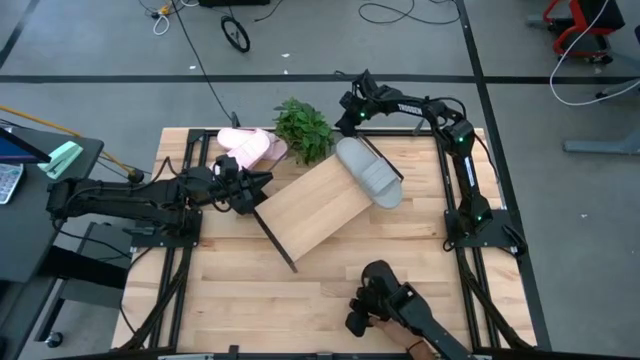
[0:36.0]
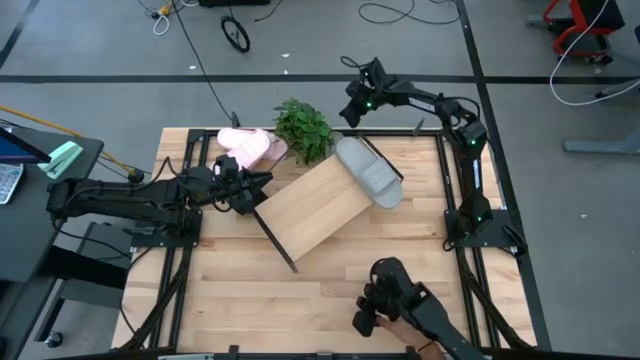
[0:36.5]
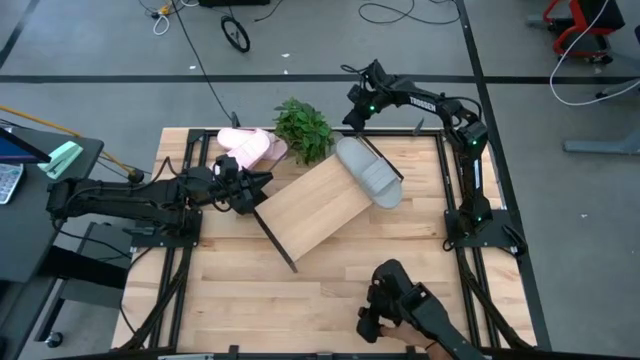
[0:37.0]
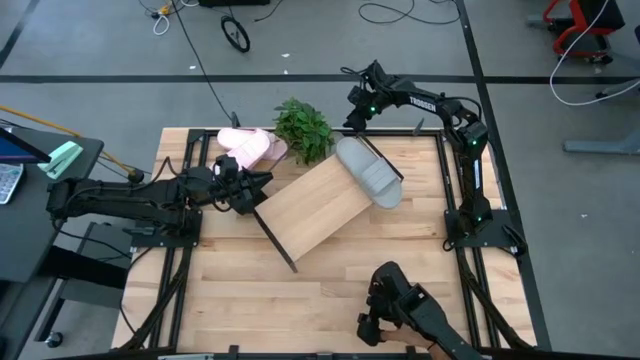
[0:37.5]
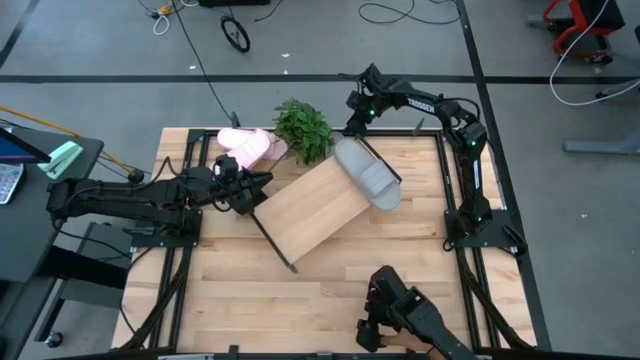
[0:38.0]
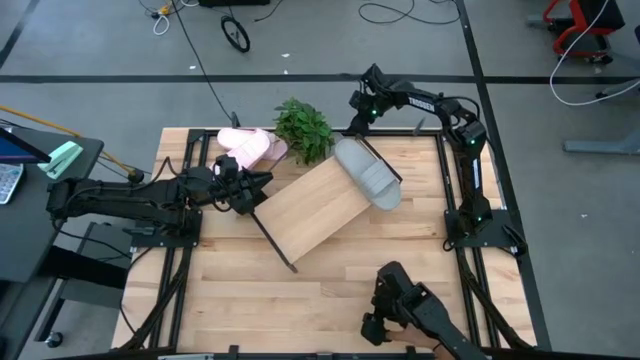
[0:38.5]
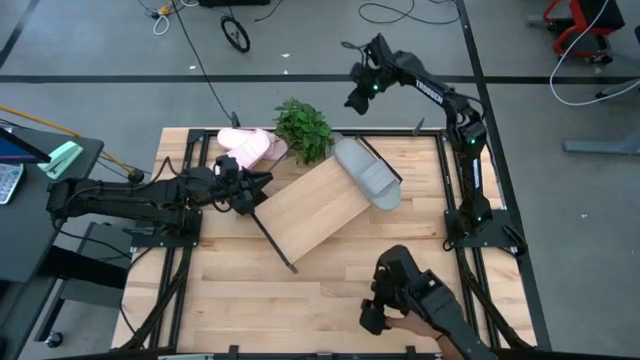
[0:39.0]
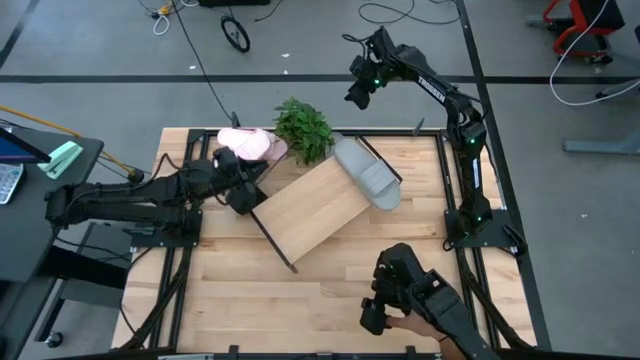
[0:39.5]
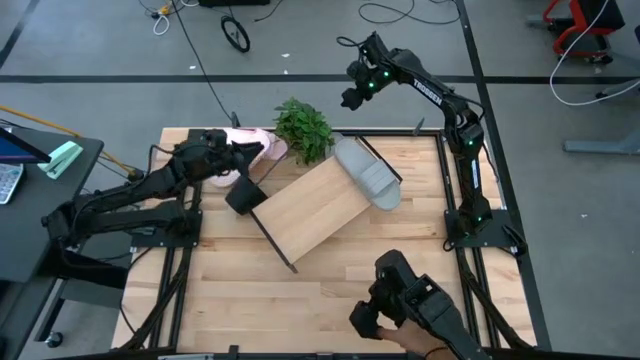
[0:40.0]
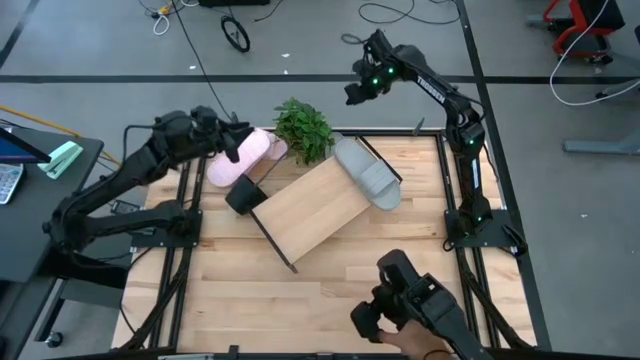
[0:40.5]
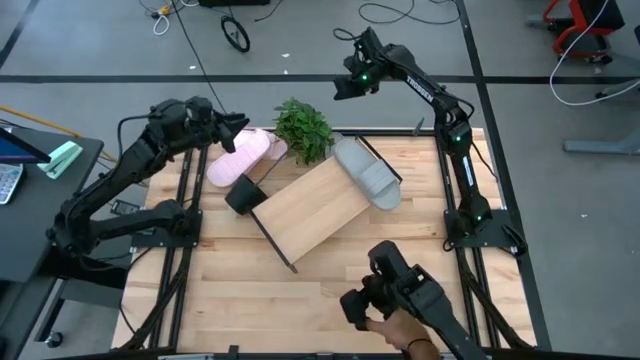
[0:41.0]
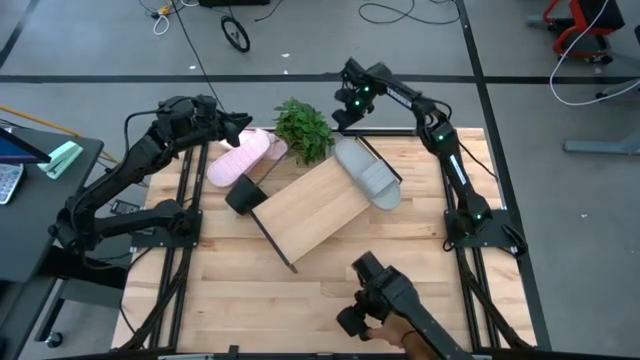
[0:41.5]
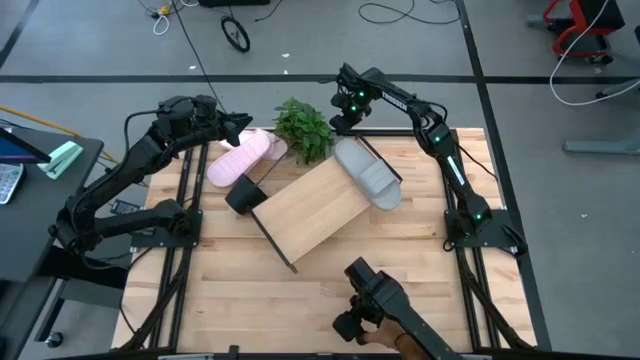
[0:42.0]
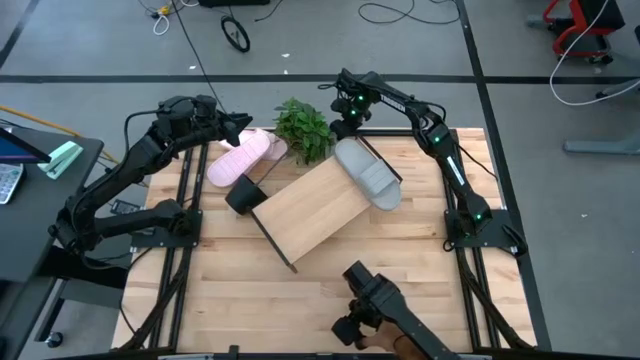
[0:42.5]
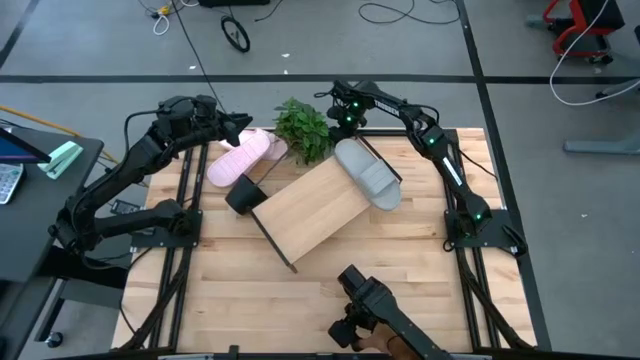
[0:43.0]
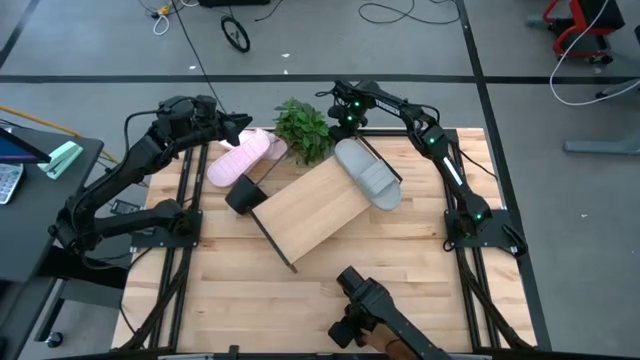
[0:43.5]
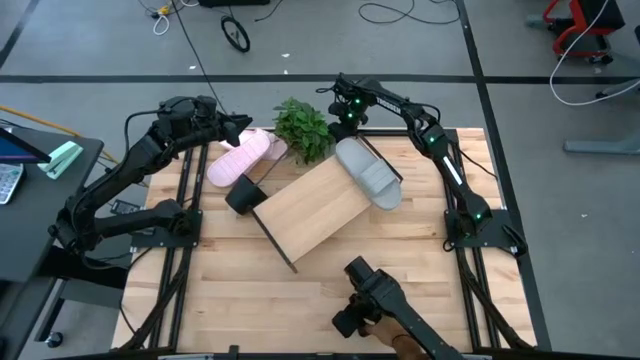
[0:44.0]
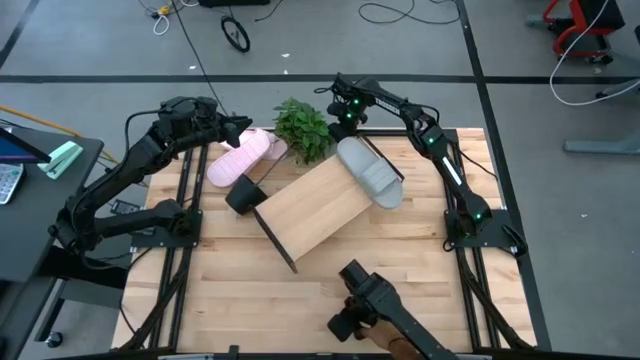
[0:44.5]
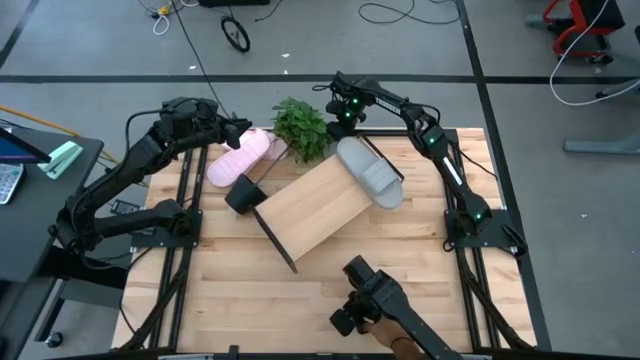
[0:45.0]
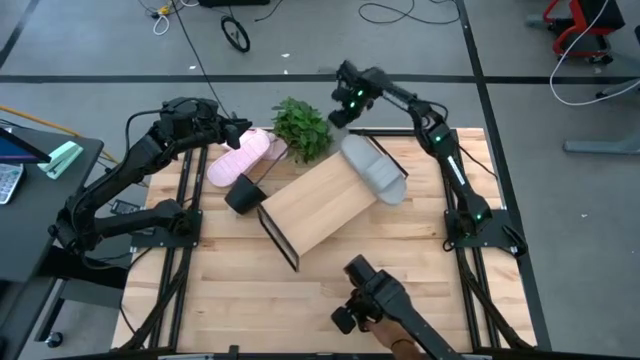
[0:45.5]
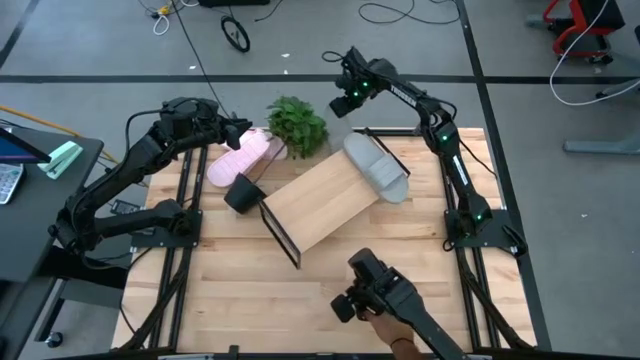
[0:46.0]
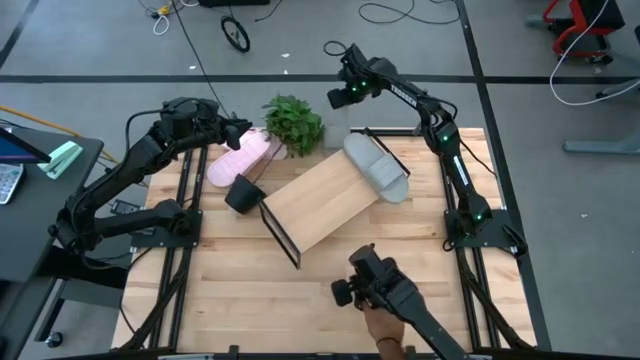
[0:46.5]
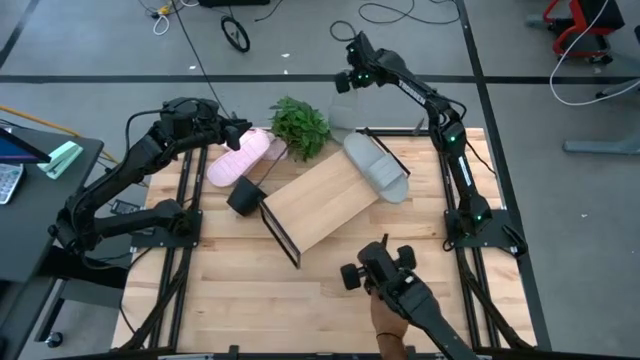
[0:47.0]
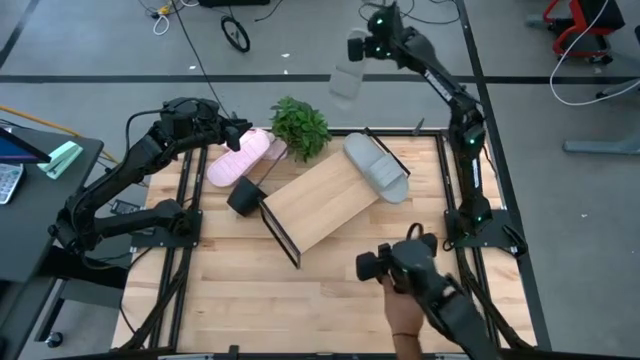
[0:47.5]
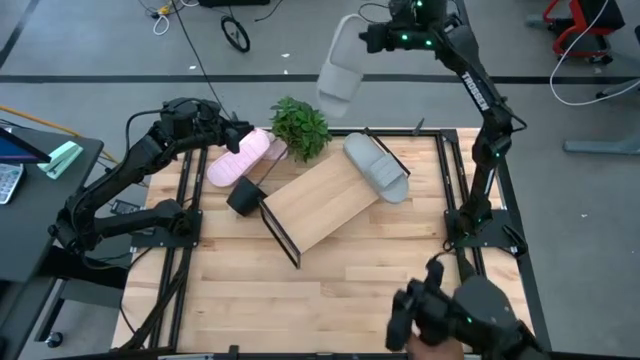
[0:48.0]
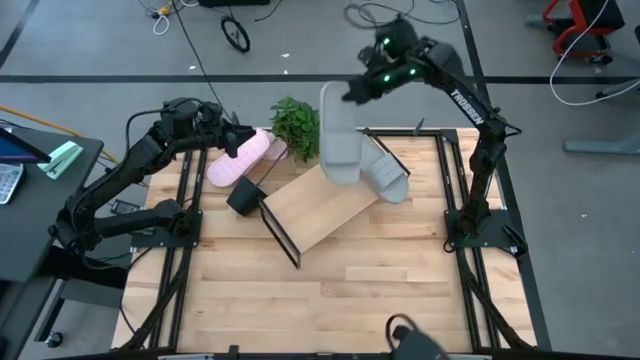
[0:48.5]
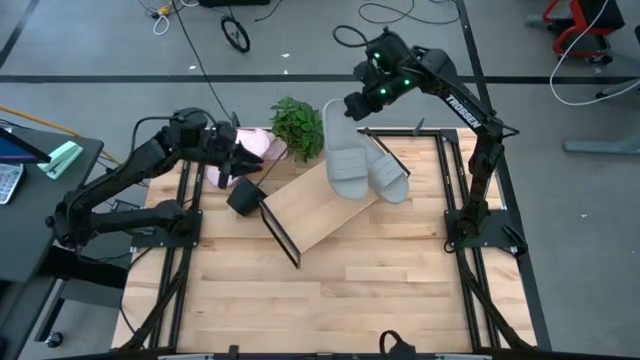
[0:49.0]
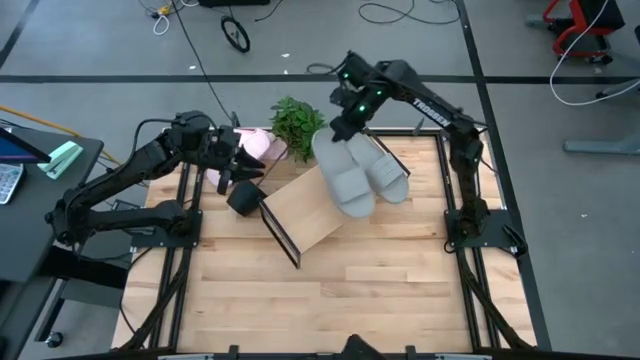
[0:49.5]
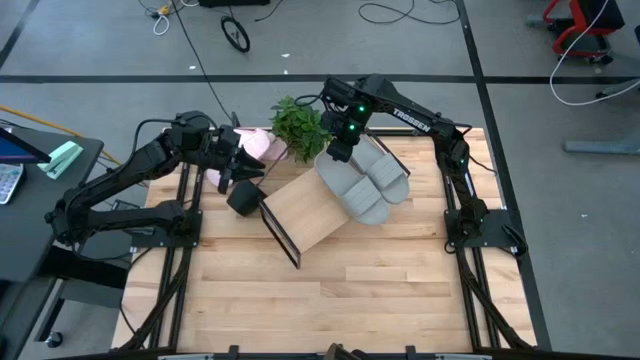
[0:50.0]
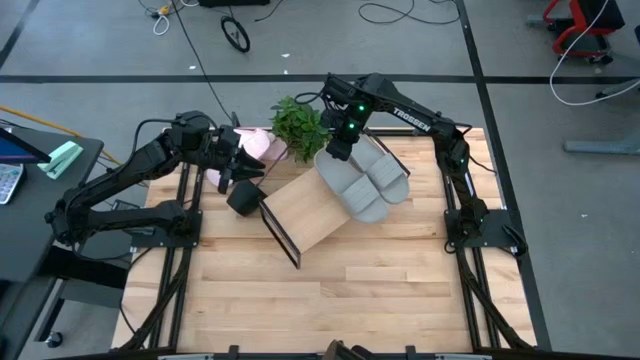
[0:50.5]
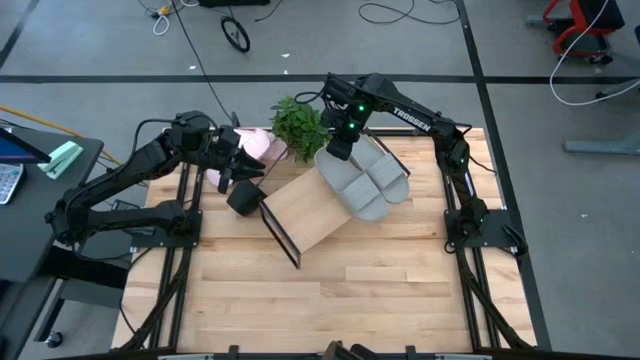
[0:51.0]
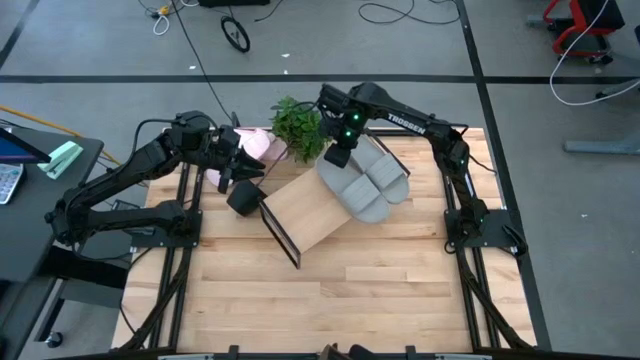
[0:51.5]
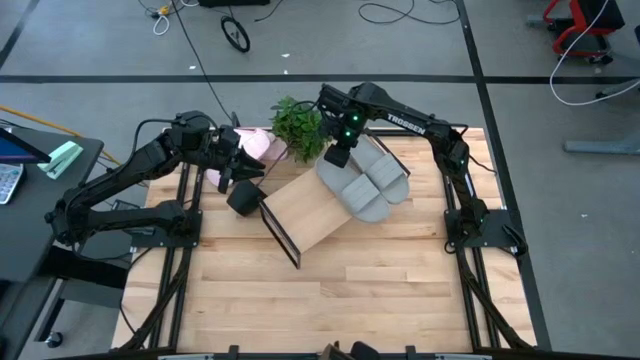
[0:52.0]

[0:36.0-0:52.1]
Task: Pick and place slides into the shelf
Put the gray slides on the shelf

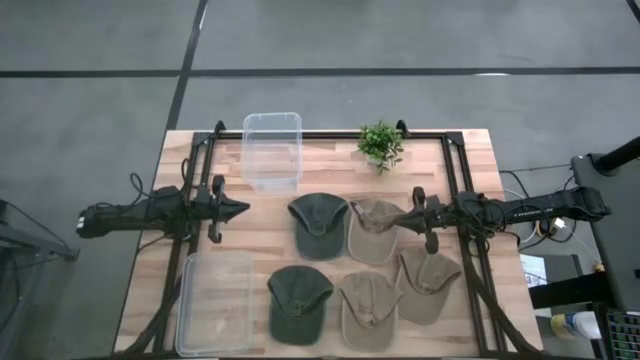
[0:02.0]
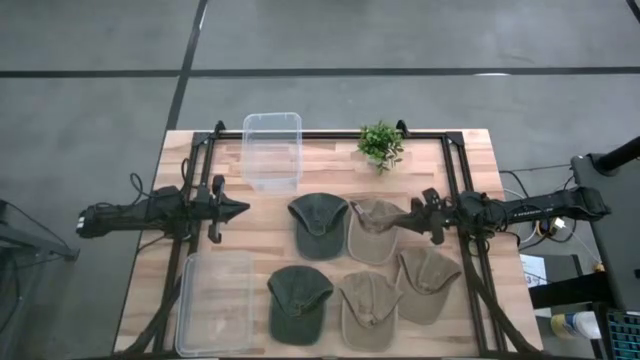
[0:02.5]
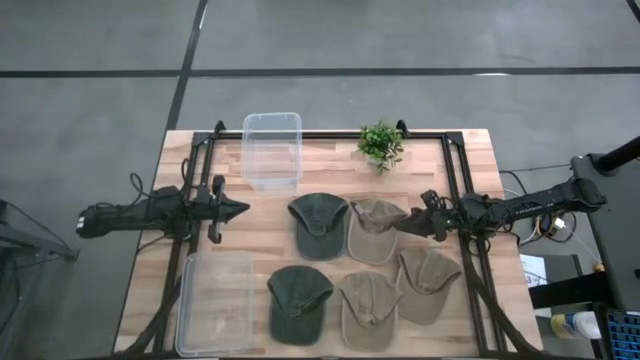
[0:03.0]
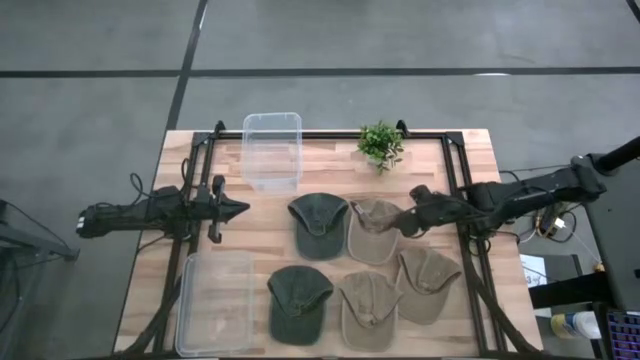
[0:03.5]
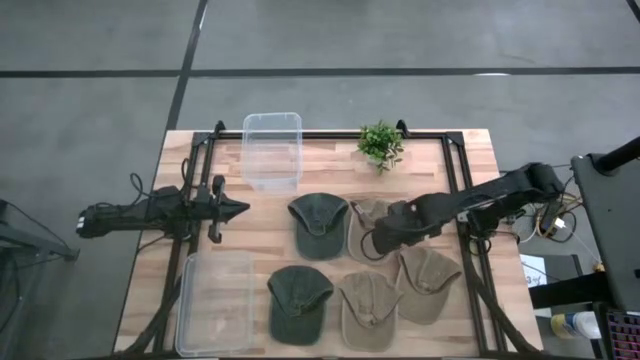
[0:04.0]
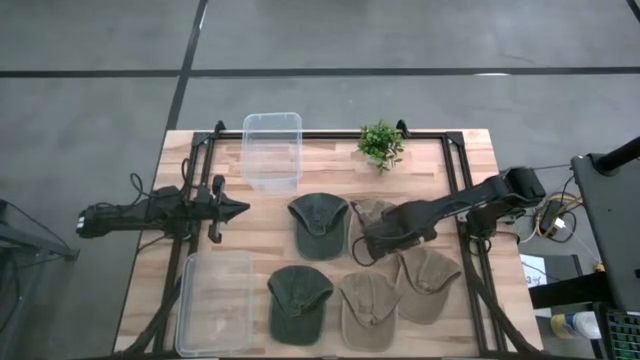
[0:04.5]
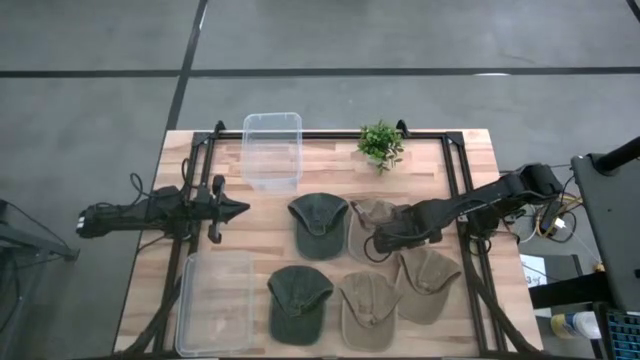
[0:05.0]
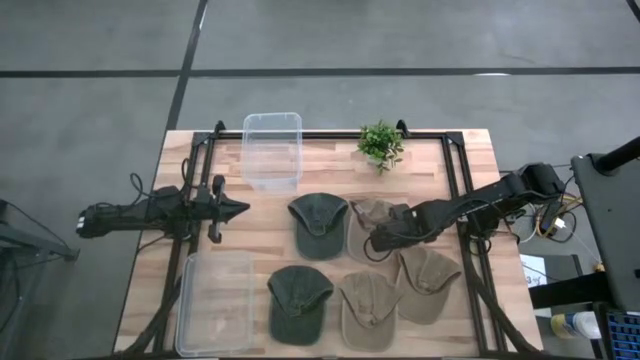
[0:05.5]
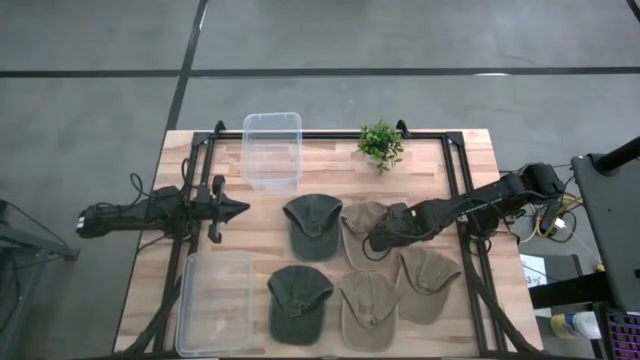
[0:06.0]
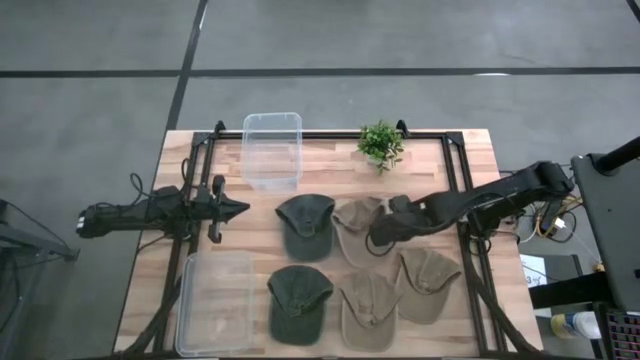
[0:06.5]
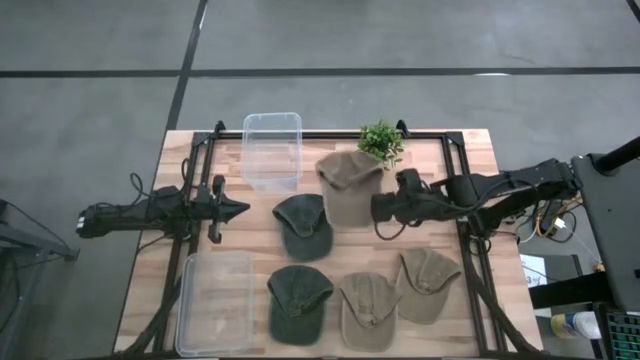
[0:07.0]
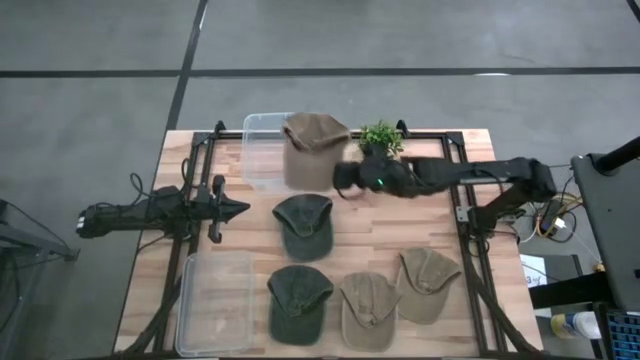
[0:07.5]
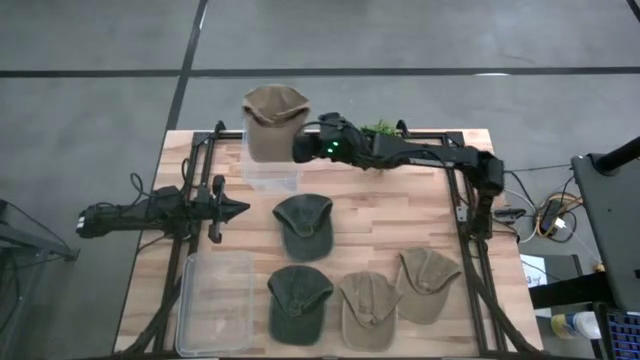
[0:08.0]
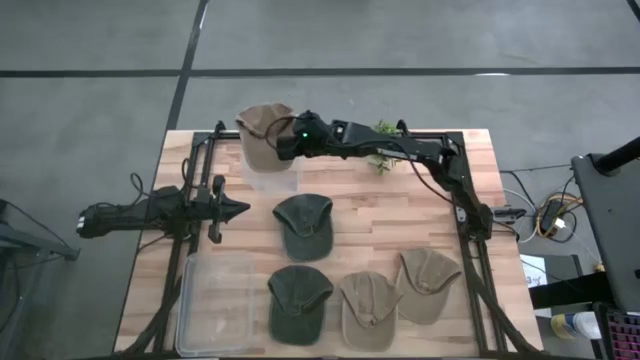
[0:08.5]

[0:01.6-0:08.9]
Task: Pick & Place hat
Put the top brown cap into the top transparent bin
